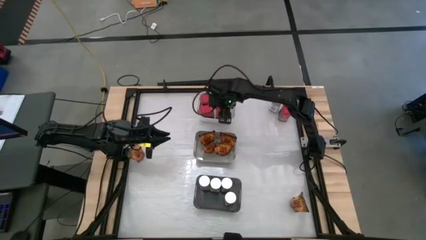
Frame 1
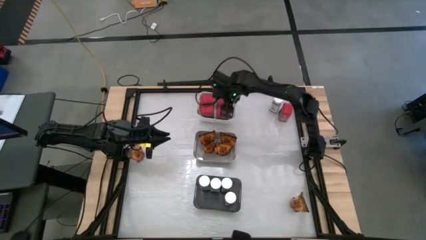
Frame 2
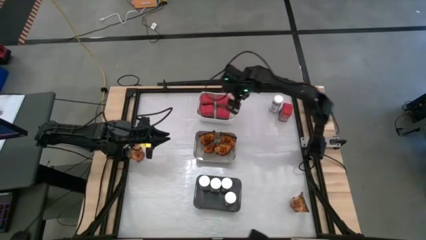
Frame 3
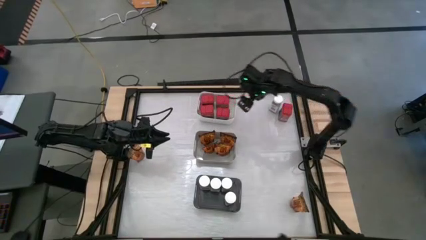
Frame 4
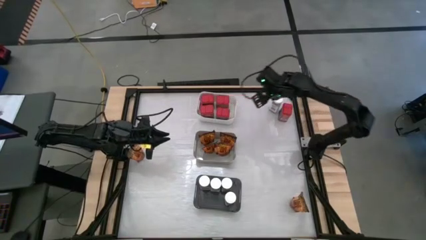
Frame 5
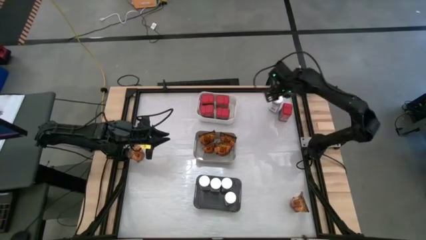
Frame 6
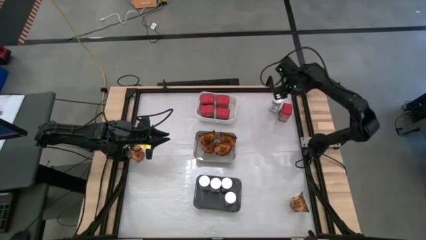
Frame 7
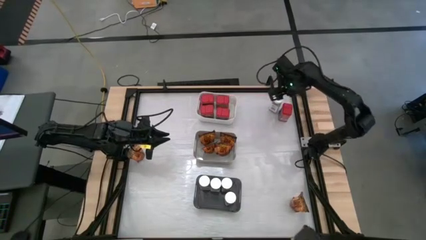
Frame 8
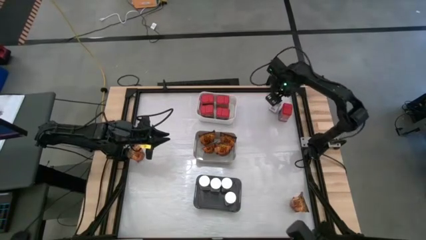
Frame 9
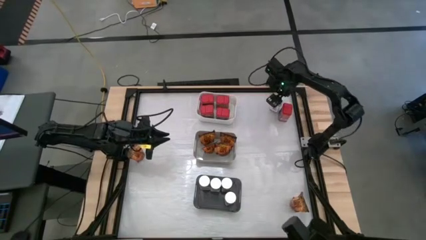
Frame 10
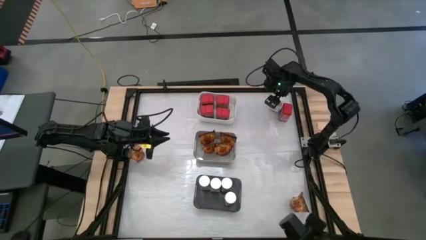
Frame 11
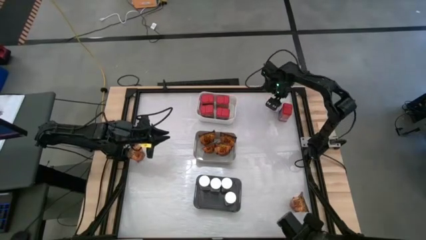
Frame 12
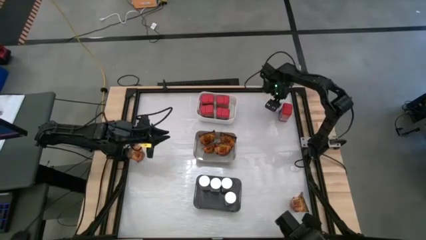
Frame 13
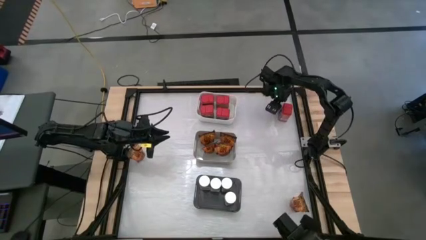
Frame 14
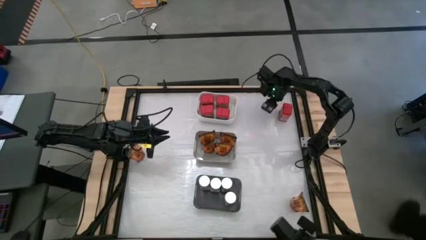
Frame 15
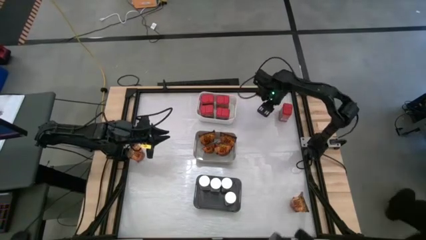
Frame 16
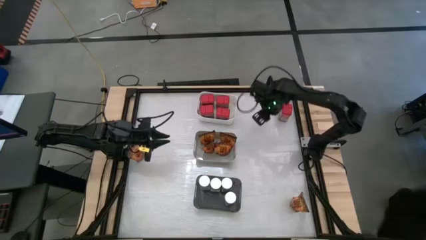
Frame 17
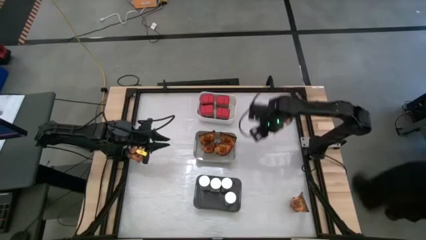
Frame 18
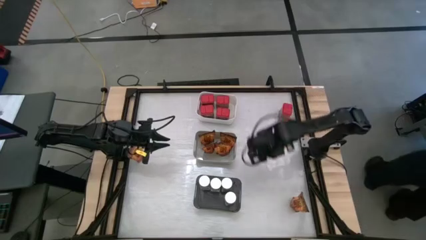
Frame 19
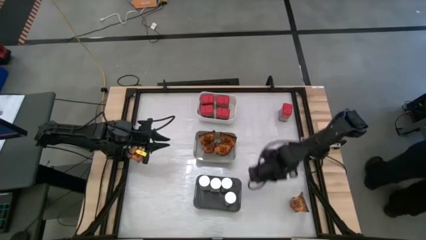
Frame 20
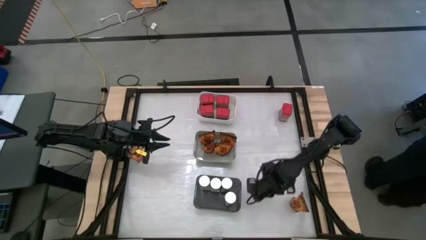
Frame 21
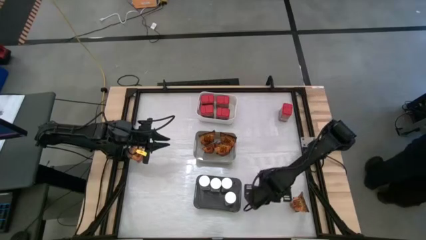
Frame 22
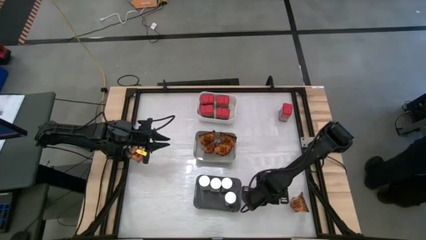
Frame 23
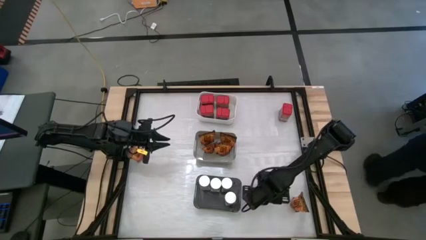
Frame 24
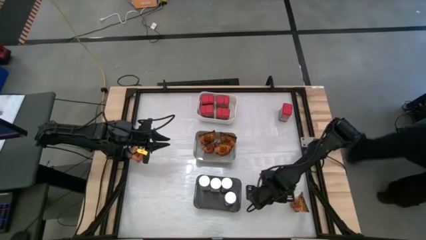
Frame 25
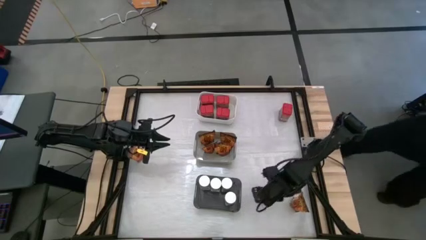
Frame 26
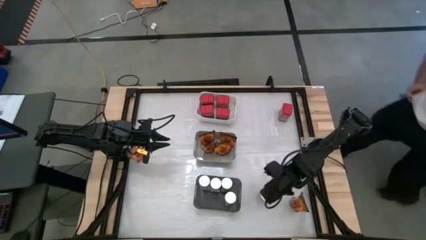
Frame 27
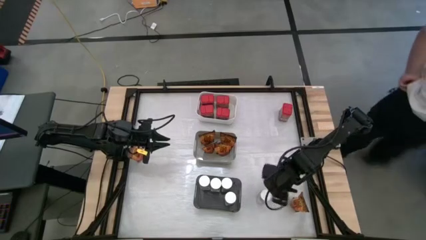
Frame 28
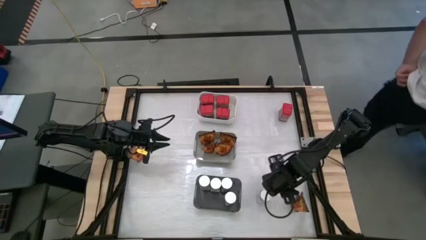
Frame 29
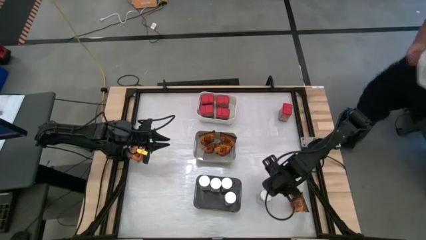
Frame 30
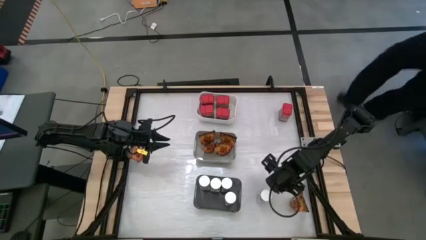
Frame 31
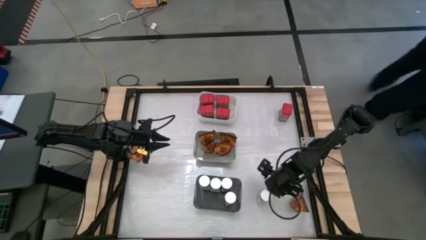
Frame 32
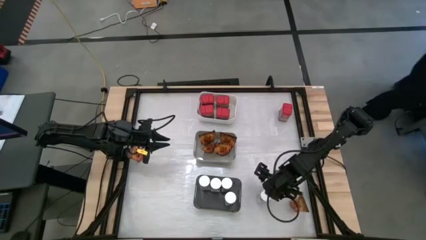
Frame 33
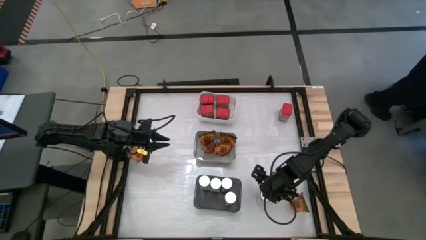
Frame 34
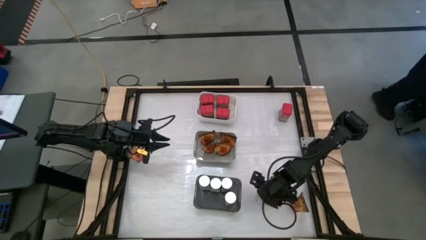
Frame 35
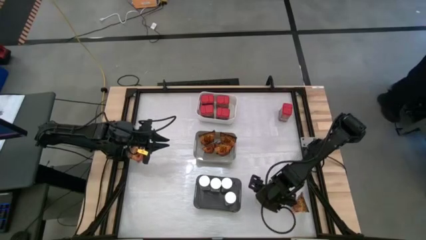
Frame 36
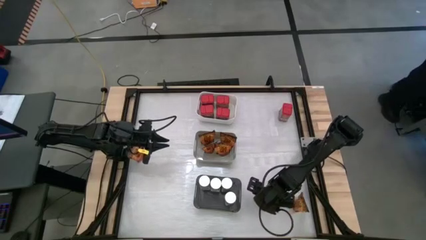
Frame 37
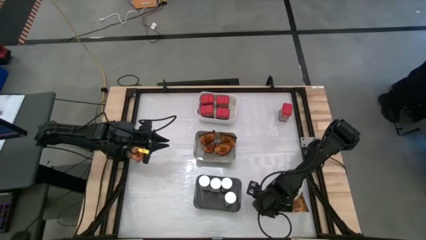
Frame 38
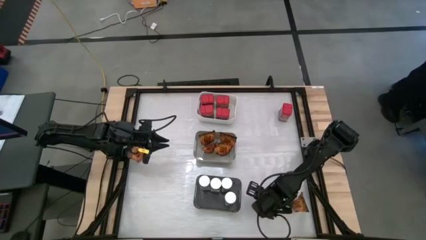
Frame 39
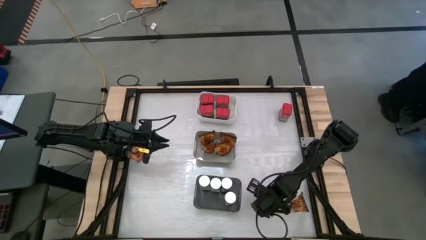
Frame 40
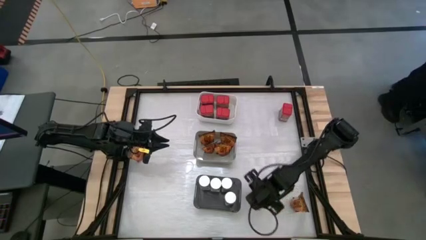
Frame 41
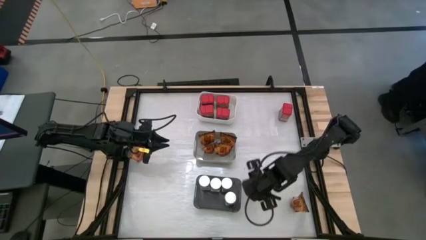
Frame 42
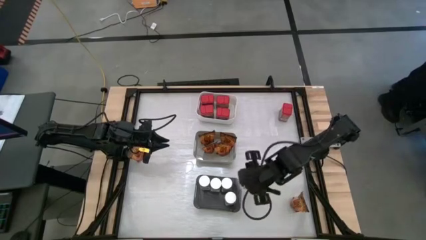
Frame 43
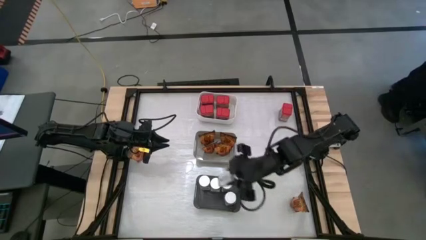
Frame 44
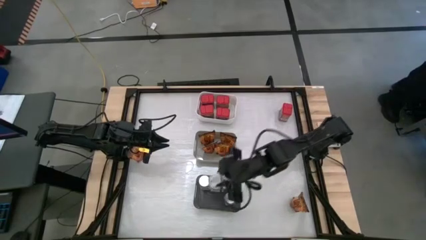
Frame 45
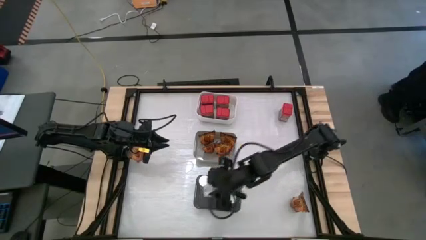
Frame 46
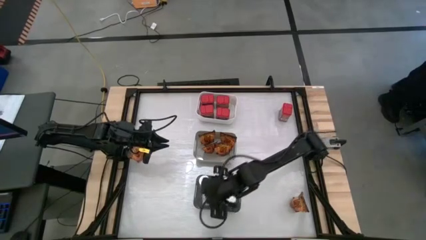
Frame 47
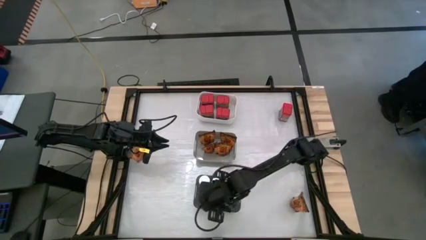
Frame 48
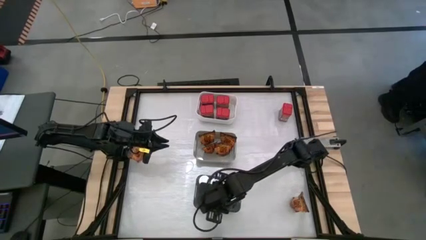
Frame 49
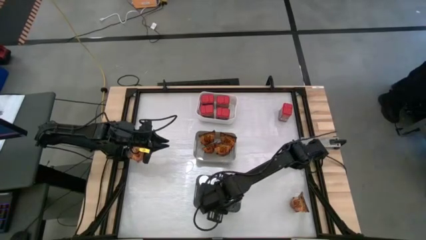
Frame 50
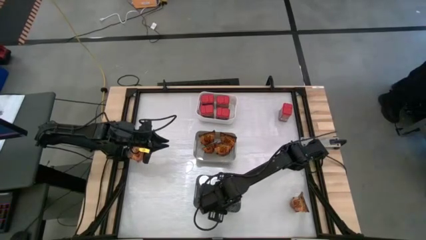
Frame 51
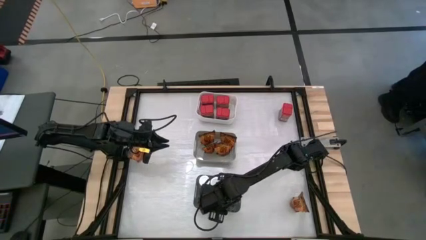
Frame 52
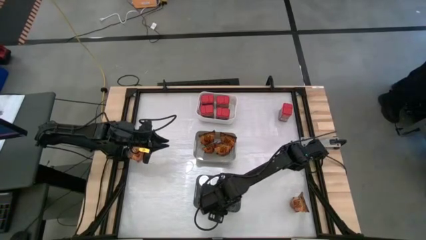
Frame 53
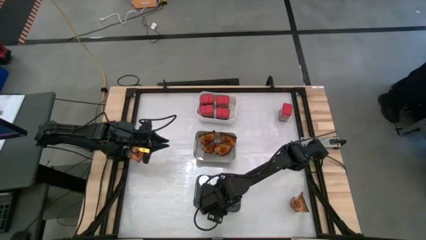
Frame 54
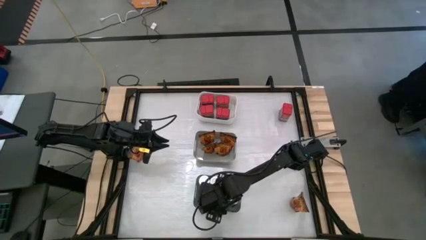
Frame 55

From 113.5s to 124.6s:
Task: Sort spices by type
Put the white seasoning bottle into the black bin

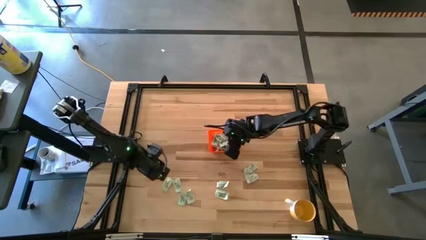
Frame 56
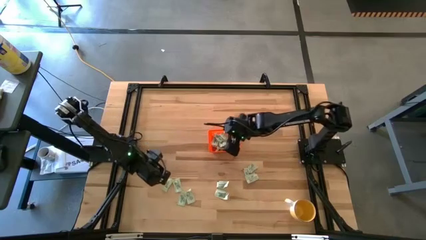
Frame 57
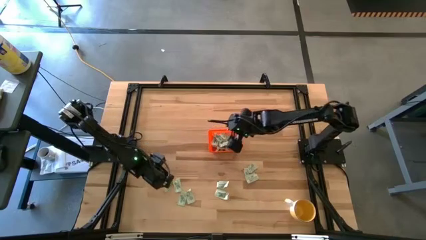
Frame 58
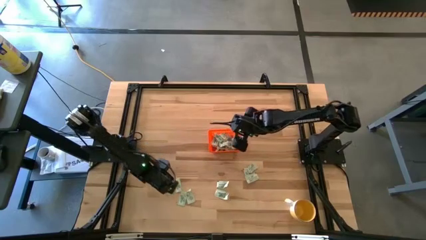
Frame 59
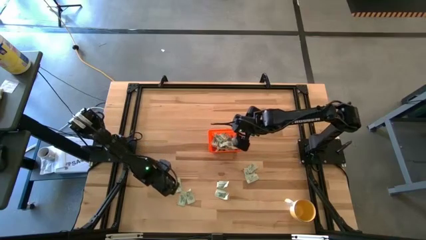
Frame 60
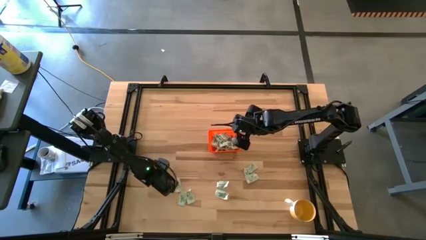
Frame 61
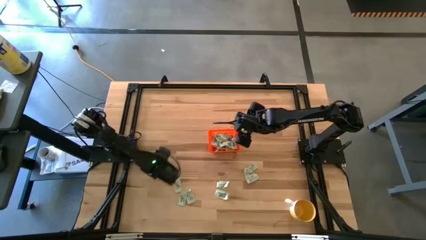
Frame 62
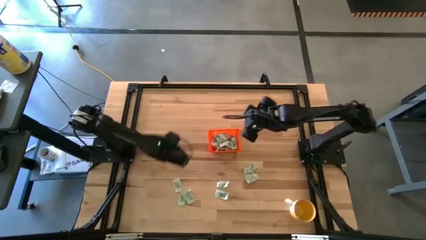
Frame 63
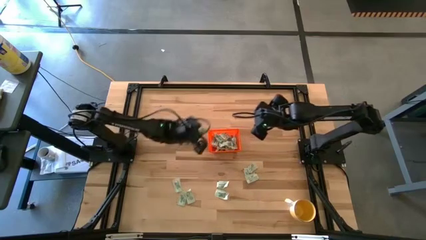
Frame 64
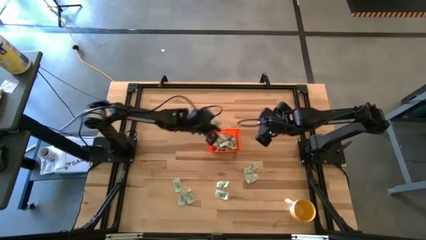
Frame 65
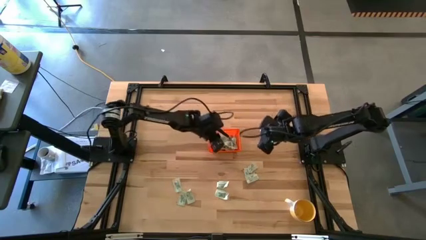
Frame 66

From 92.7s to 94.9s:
Task: Pick and place Stevia / Truvia into bins
Put the light green stevia packet into the orange basket

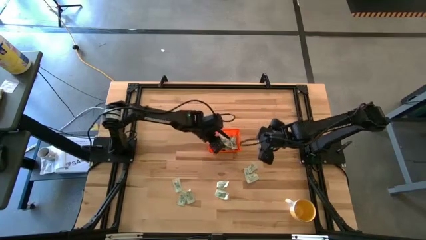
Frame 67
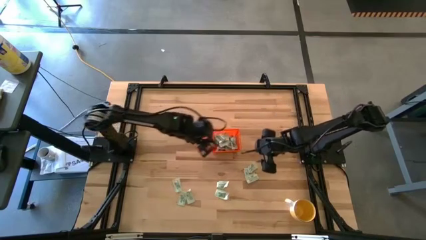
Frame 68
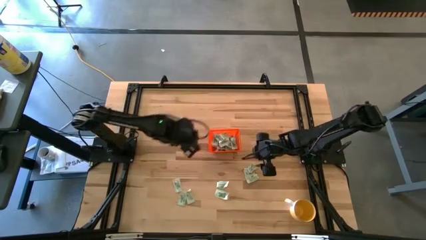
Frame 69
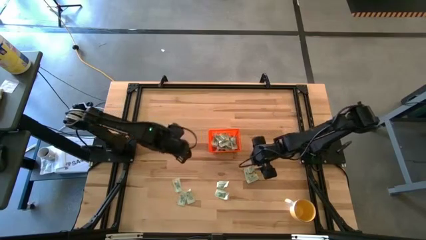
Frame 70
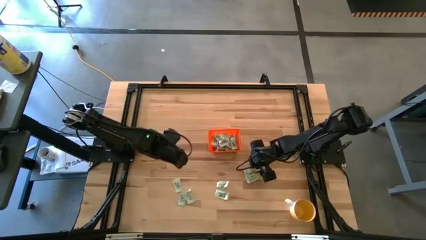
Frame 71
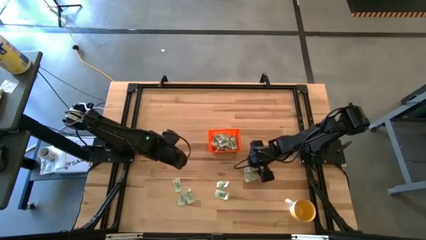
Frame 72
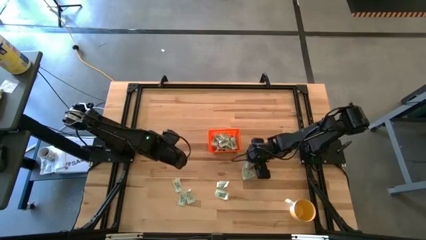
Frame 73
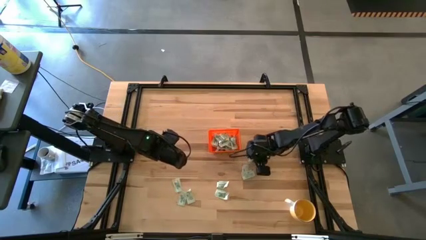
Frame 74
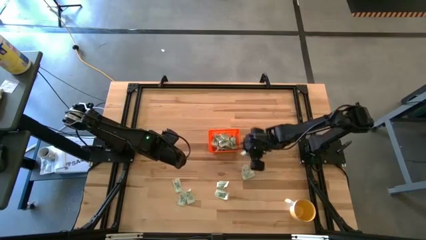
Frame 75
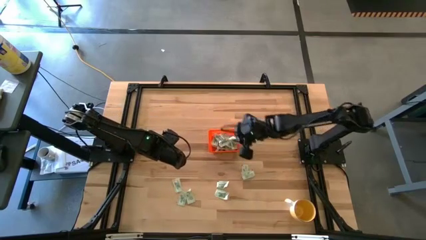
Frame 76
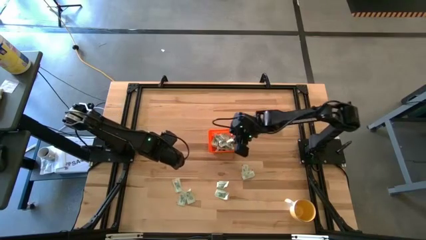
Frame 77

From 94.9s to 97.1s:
Put the light green stevia packet into the orange basket

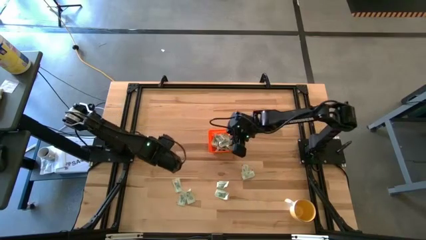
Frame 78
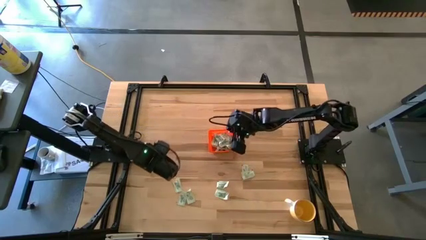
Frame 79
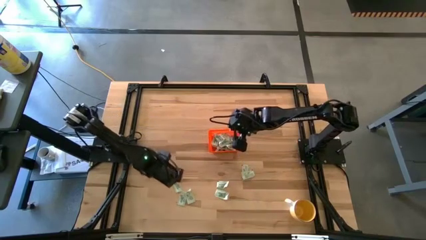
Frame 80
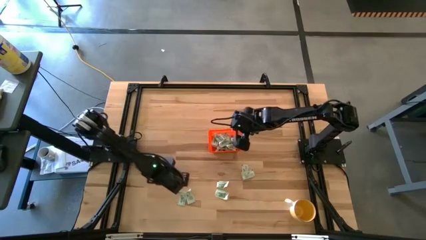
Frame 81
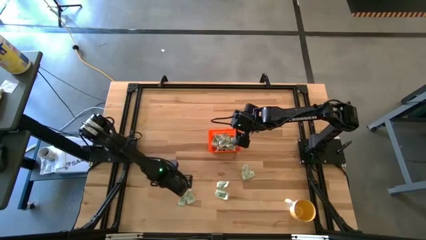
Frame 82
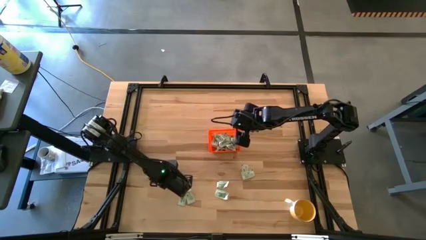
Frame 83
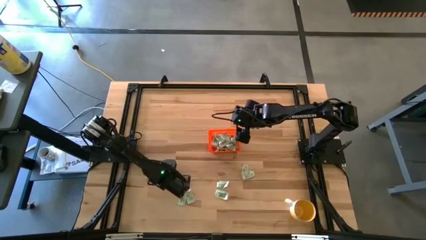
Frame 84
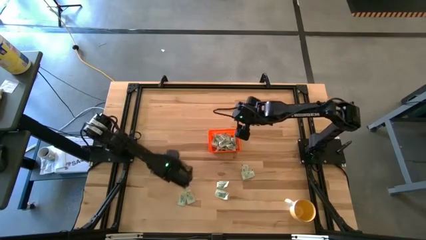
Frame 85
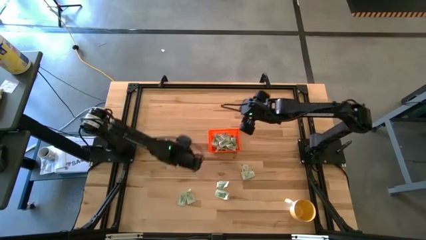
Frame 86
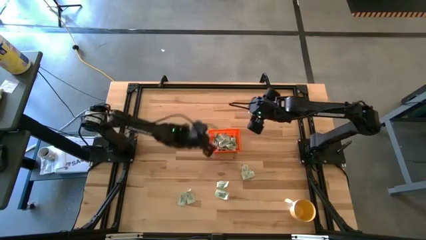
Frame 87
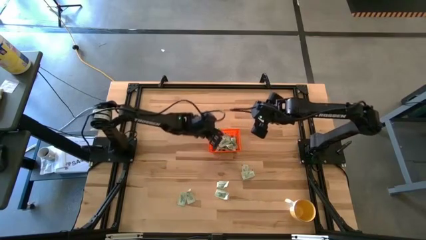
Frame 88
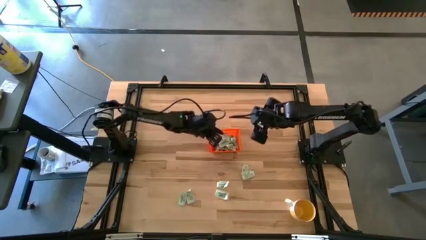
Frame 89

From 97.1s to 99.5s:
Put the light green stevia packet into the orange basket
